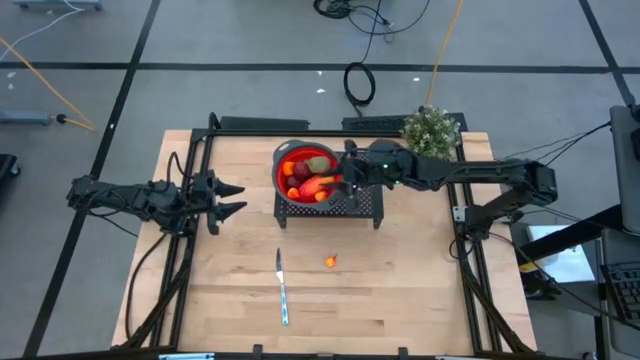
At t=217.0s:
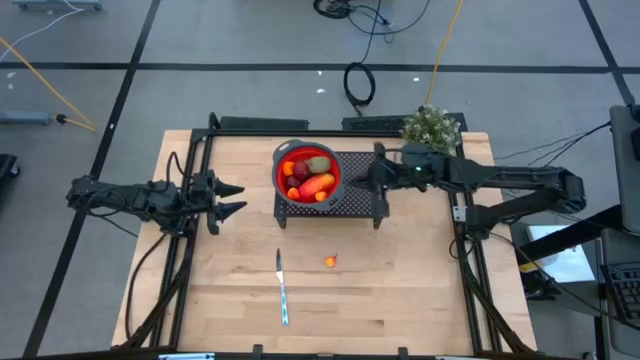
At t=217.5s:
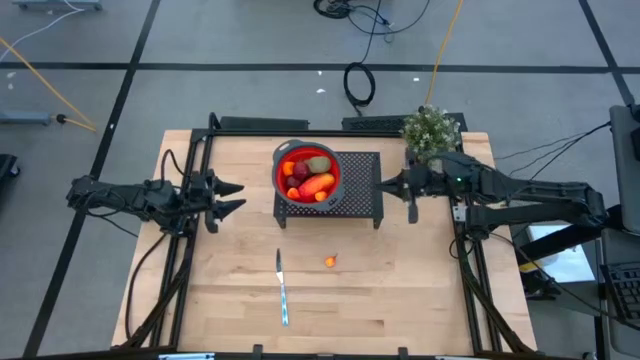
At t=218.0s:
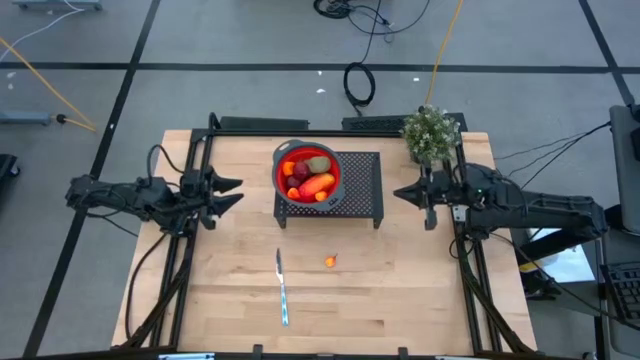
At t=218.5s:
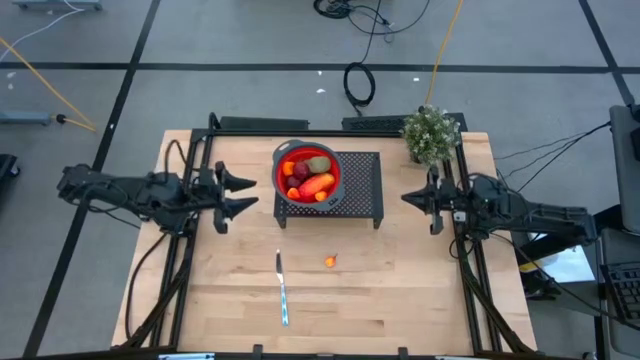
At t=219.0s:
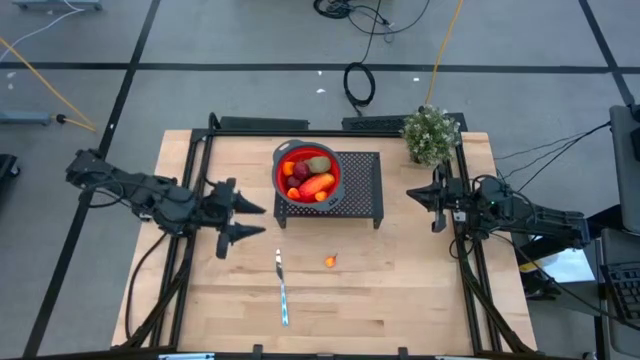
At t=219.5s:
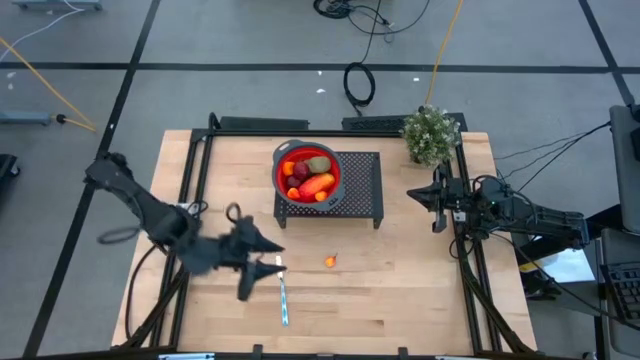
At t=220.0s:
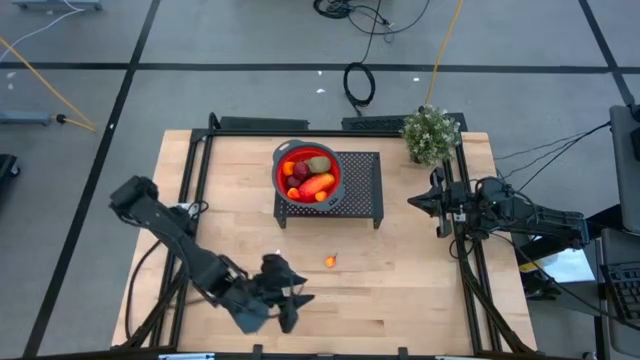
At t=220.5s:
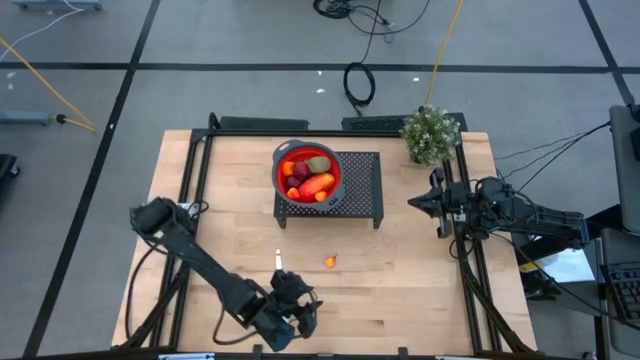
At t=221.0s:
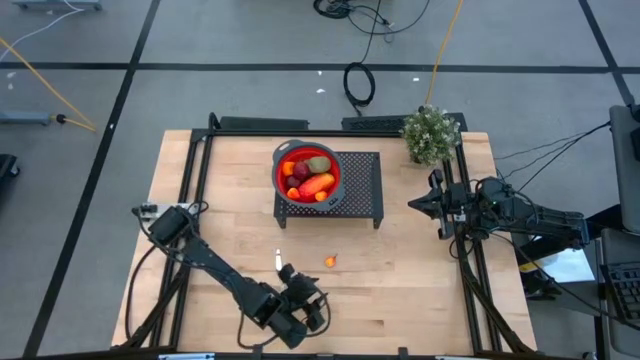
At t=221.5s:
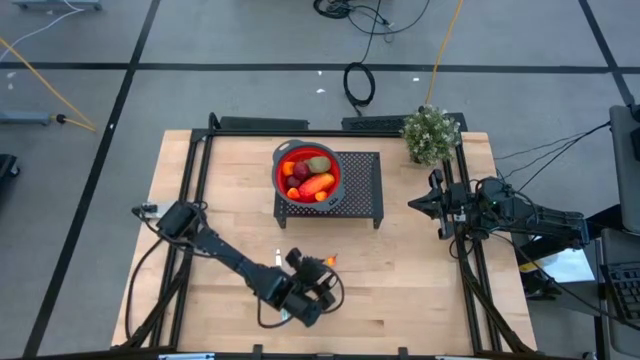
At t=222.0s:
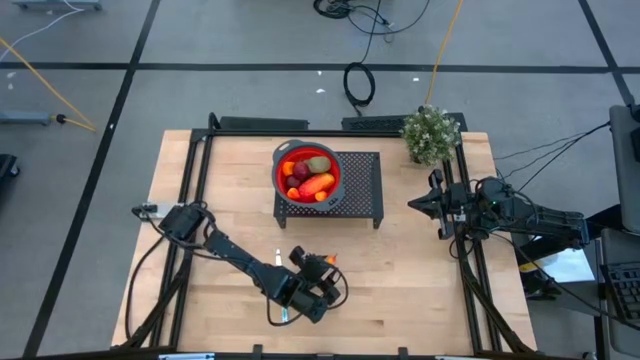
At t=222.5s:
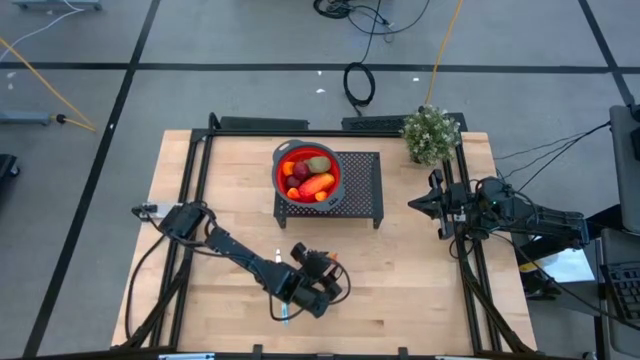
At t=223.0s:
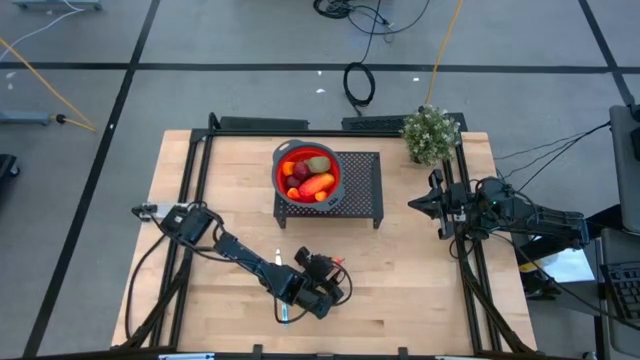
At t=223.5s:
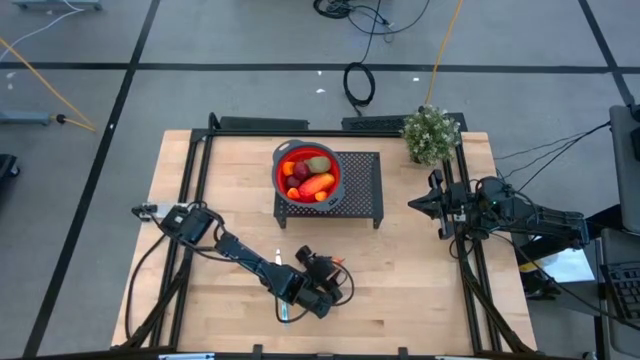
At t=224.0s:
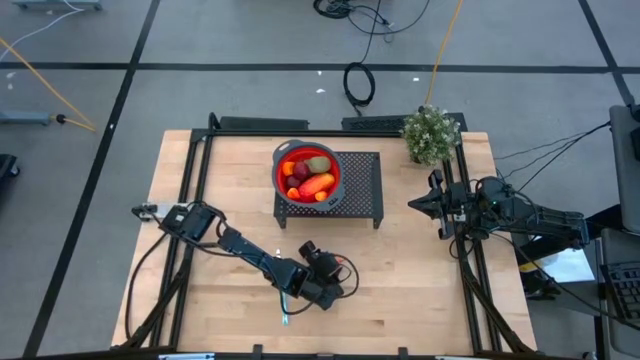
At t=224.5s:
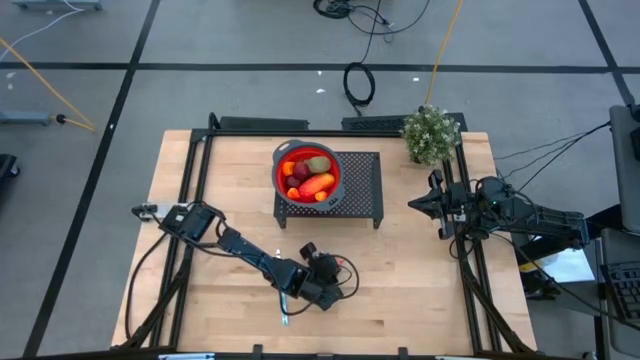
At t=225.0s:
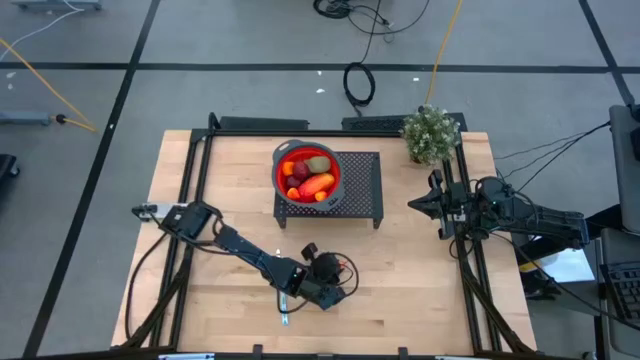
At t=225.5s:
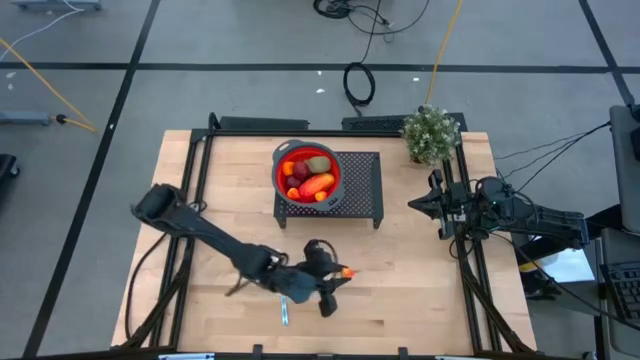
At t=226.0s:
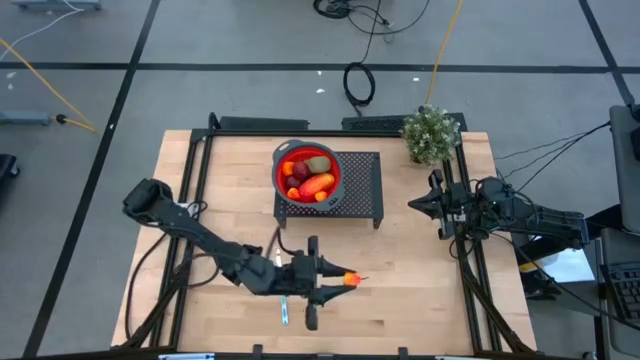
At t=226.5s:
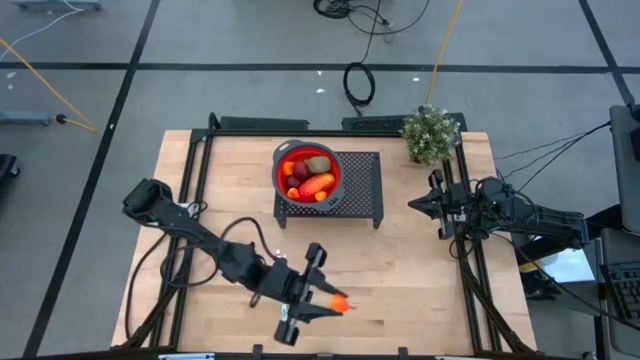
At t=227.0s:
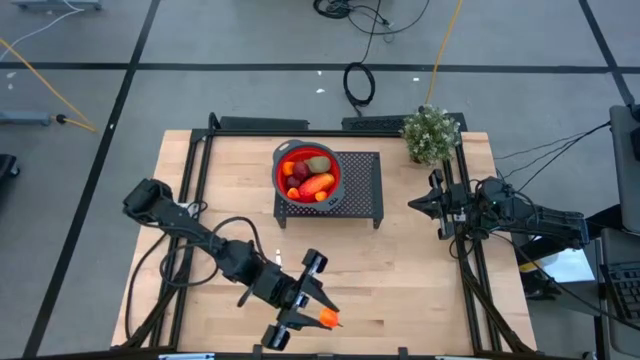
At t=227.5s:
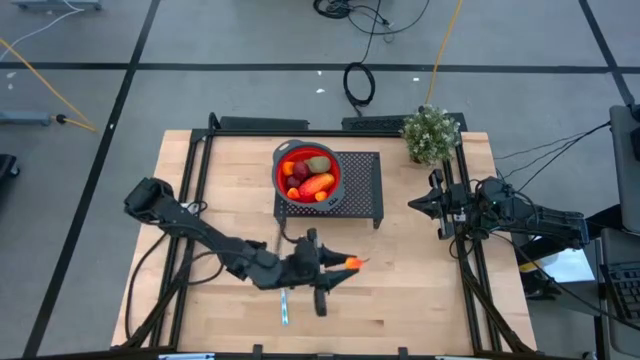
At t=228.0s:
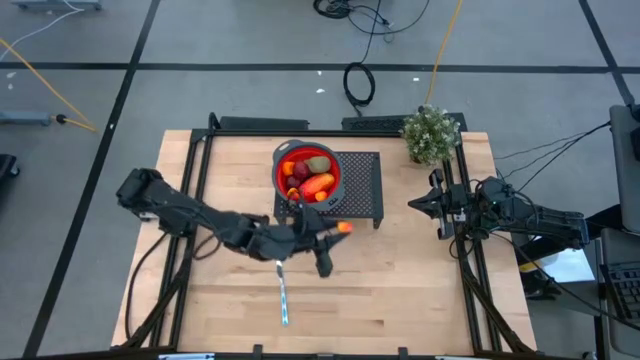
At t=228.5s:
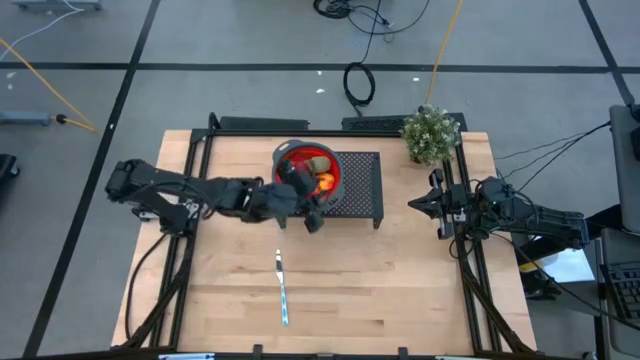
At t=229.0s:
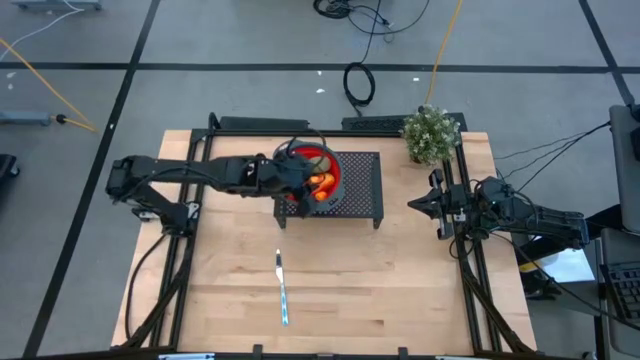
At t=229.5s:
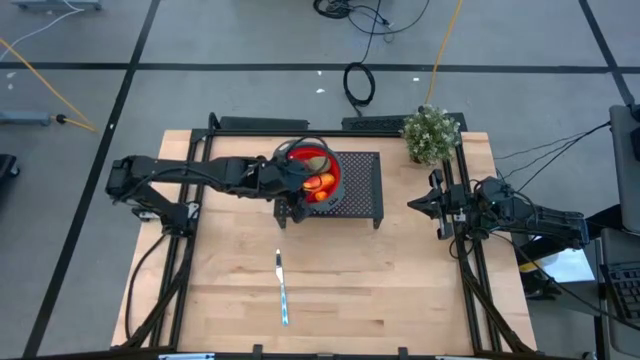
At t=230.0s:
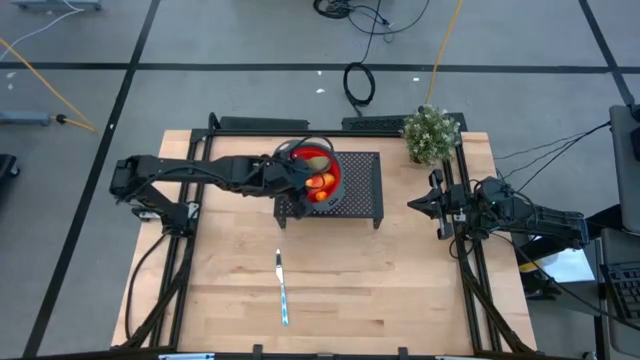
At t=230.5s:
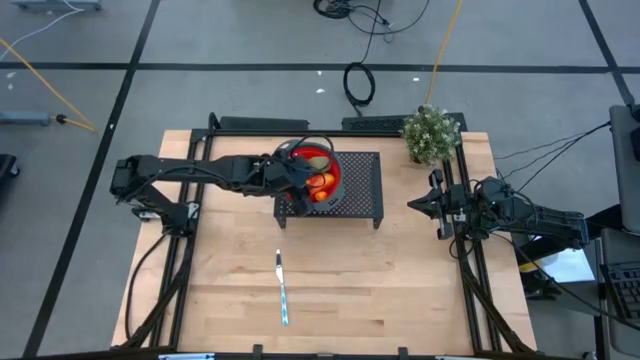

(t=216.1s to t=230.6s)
Task: Pick & Place Fruit
Put the peach into the strainer on the shelf

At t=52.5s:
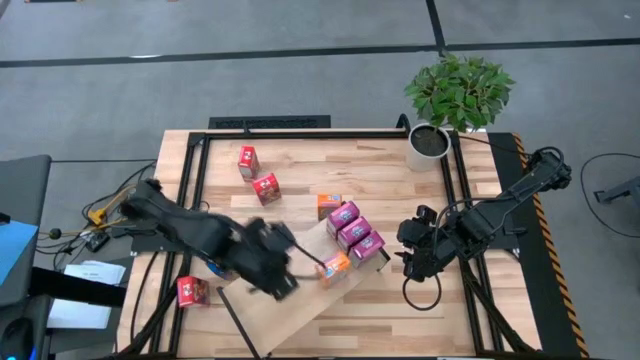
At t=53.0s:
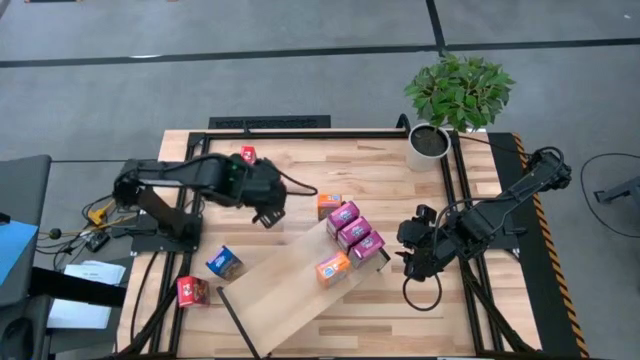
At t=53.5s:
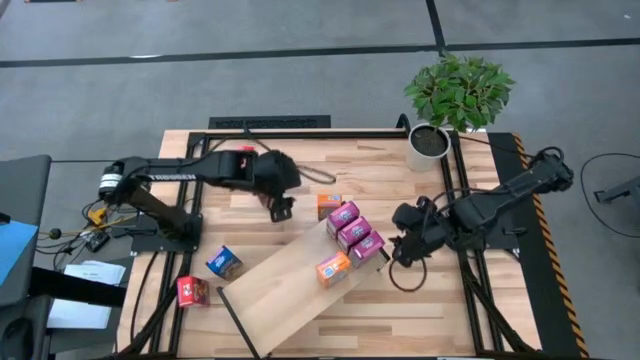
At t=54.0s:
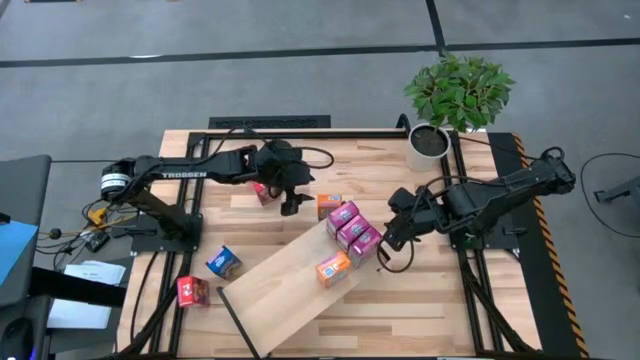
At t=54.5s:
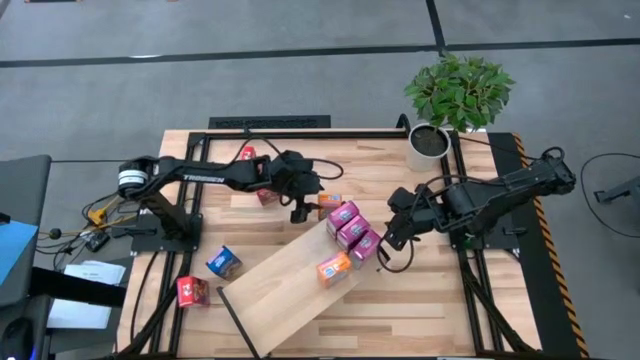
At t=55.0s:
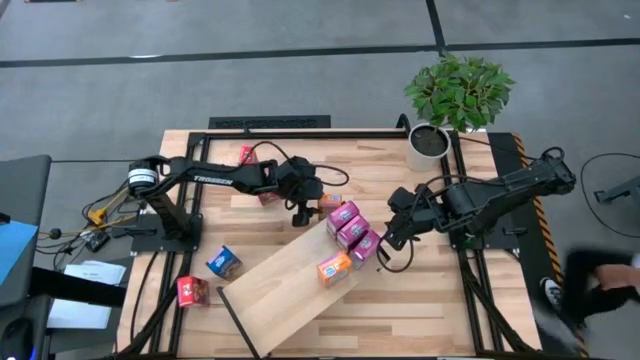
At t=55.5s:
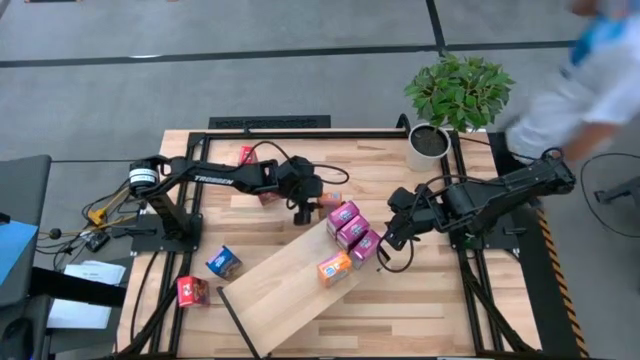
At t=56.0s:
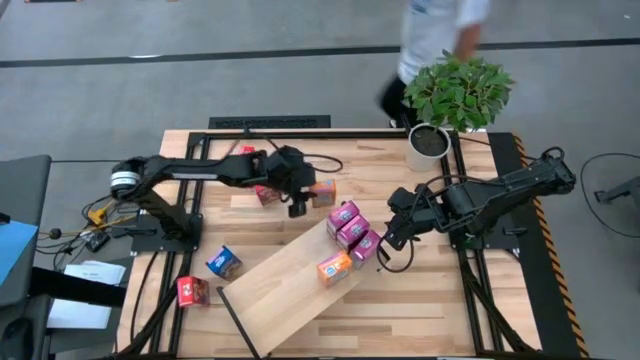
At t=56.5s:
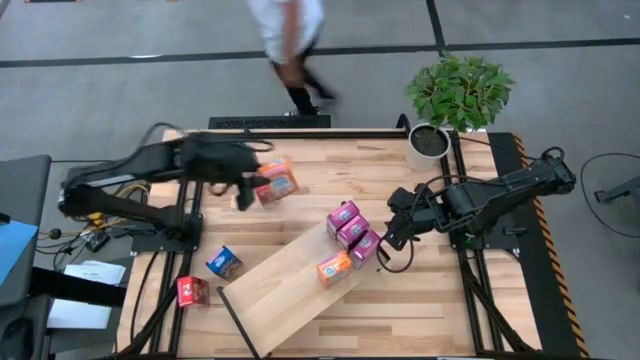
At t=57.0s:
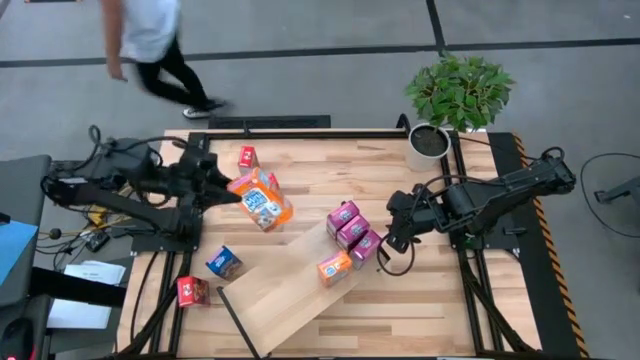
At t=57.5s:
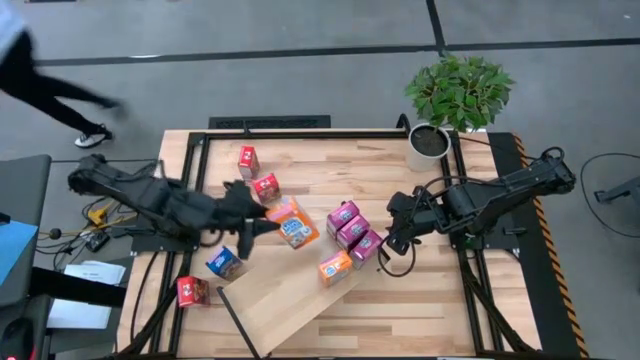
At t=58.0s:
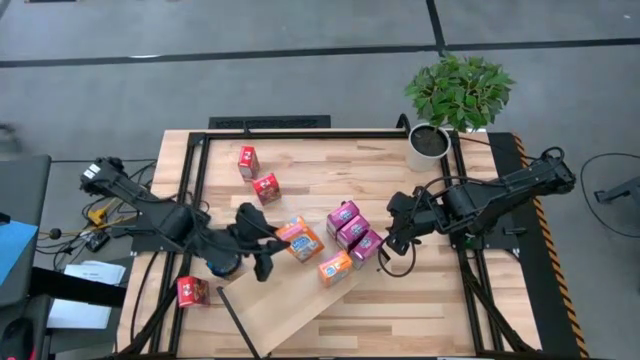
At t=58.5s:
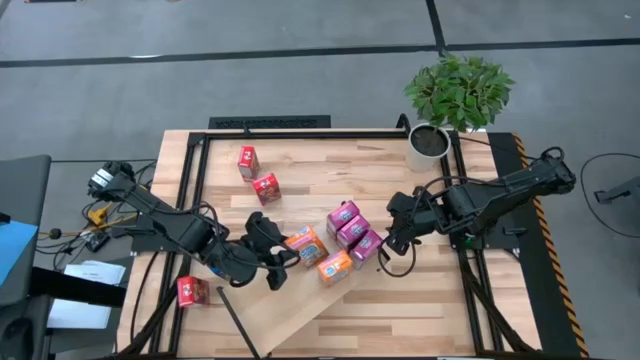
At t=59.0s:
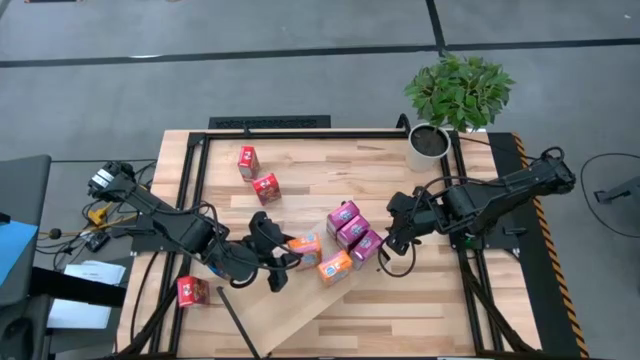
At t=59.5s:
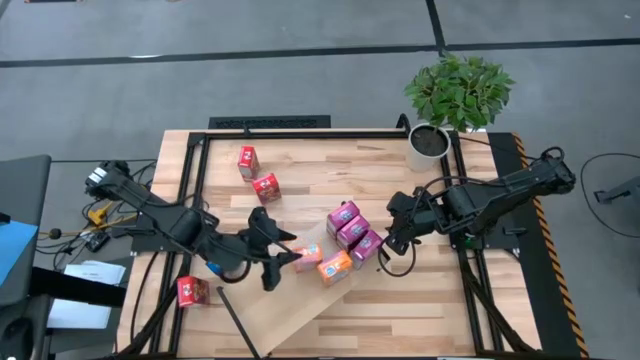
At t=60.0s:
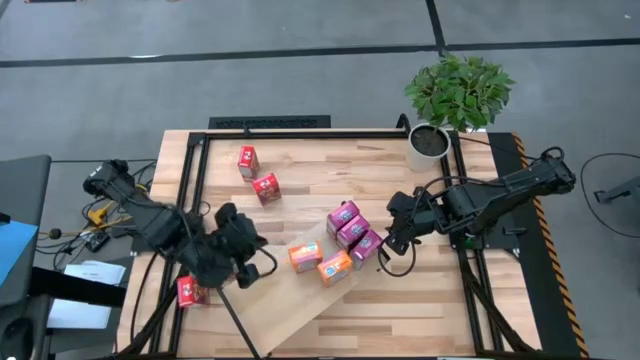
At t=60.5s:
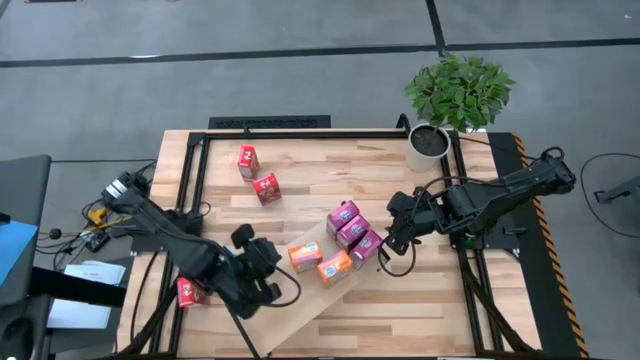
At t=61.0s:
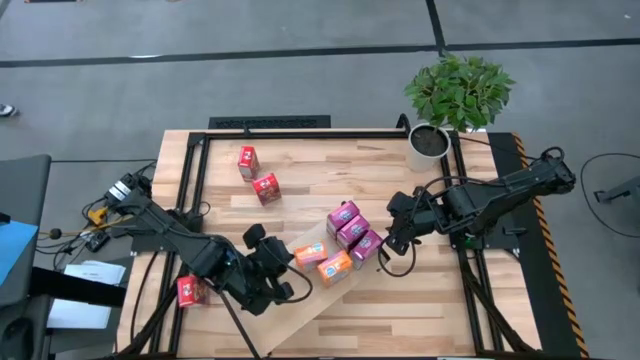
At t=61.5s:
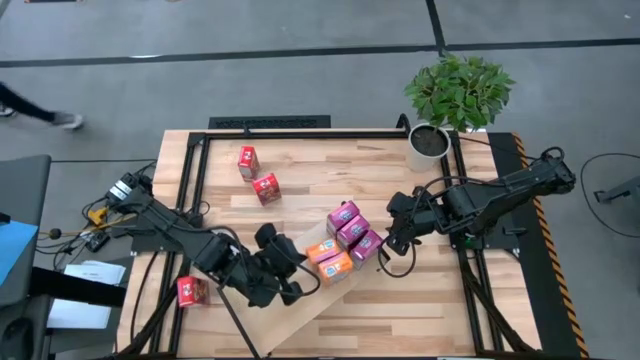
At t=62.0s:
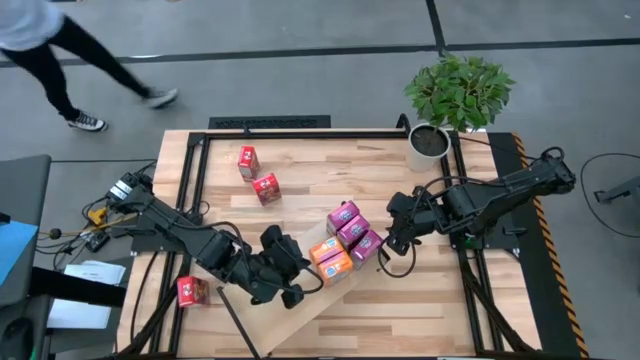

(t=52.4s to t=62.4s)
Task: Stack cereal on shelf
Put the orange cereal box onto the shelf
